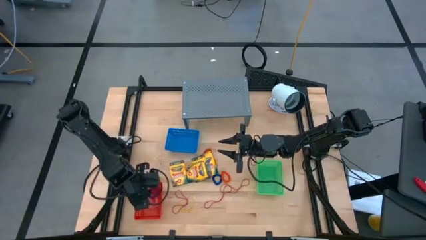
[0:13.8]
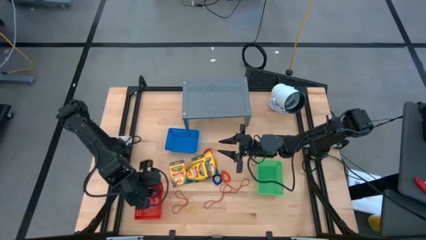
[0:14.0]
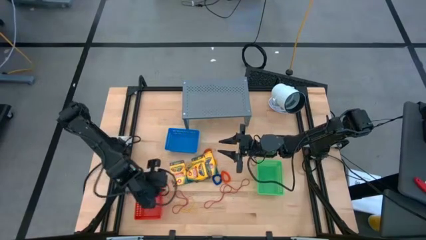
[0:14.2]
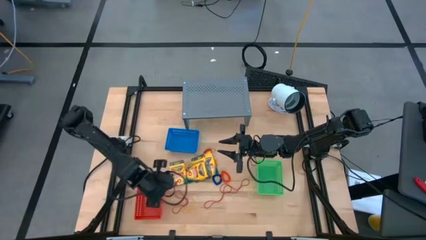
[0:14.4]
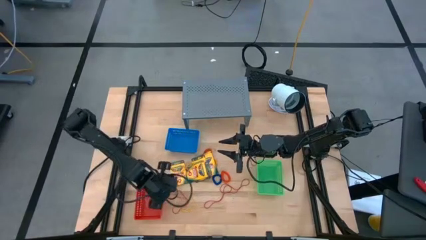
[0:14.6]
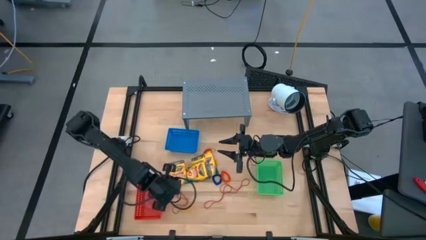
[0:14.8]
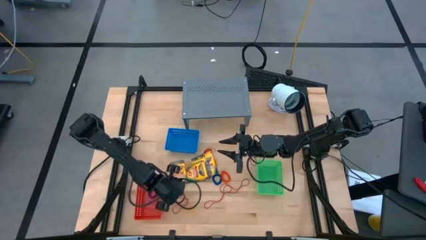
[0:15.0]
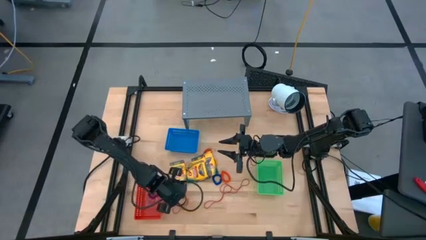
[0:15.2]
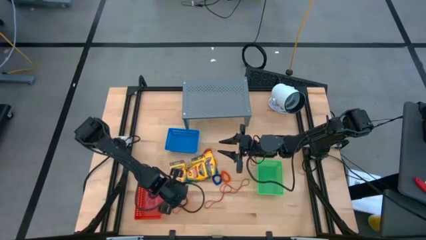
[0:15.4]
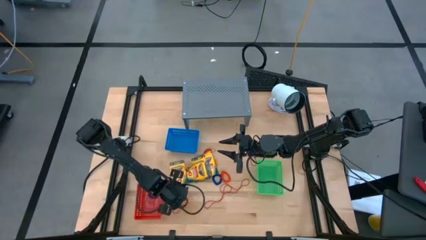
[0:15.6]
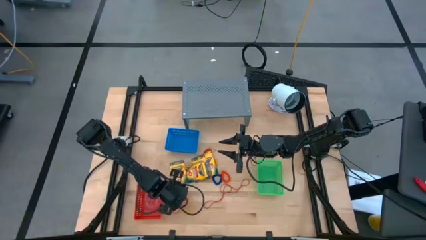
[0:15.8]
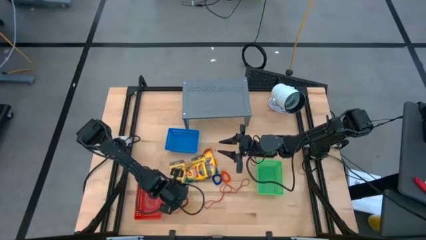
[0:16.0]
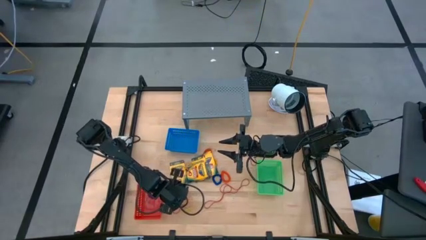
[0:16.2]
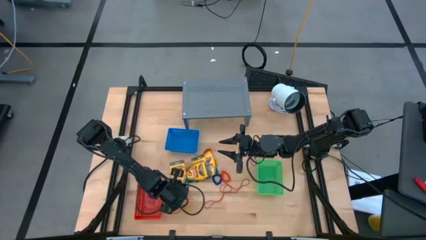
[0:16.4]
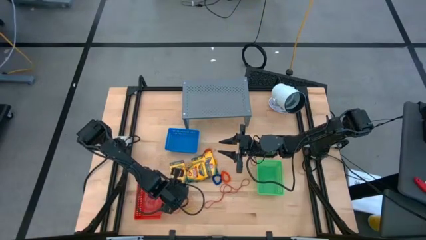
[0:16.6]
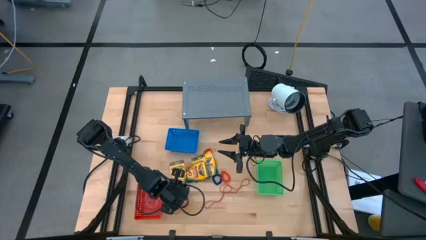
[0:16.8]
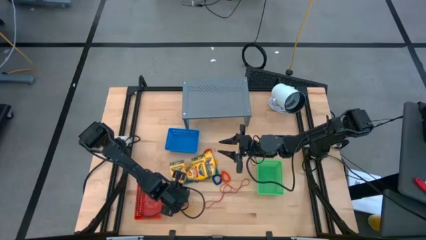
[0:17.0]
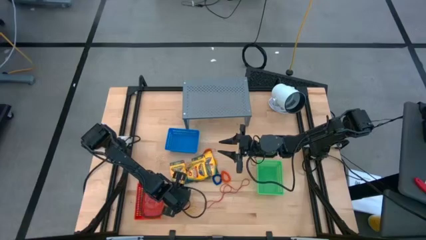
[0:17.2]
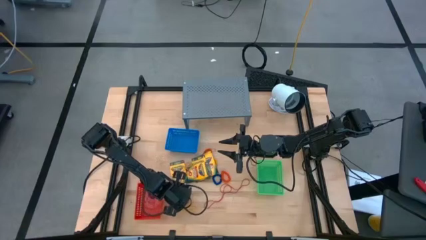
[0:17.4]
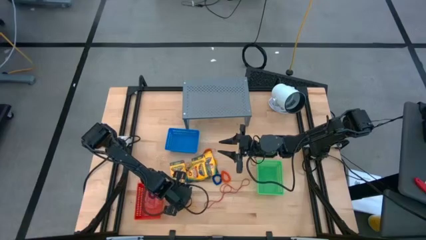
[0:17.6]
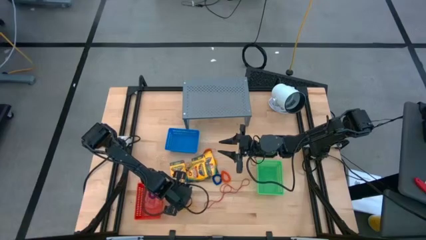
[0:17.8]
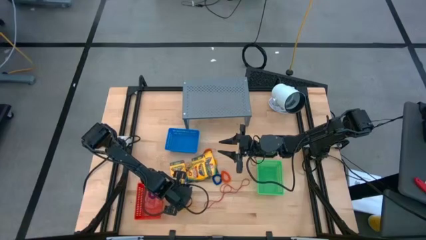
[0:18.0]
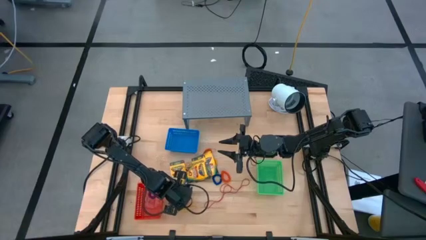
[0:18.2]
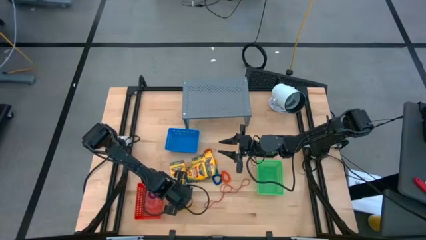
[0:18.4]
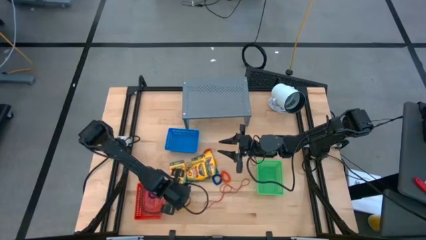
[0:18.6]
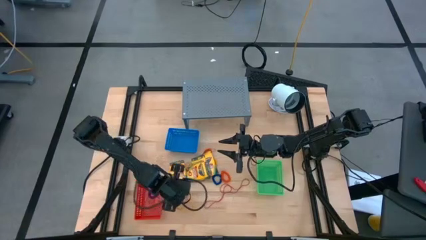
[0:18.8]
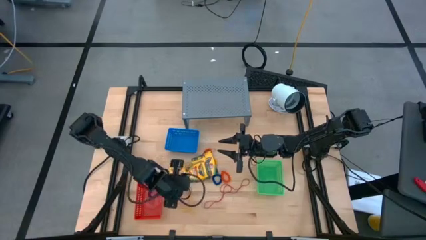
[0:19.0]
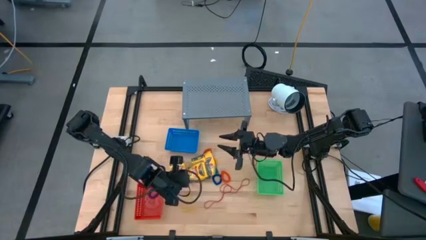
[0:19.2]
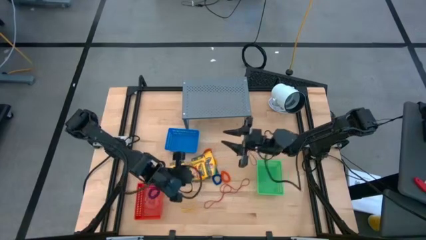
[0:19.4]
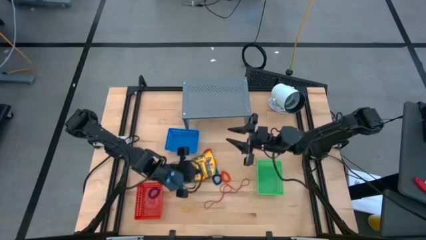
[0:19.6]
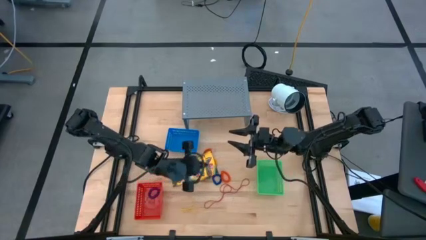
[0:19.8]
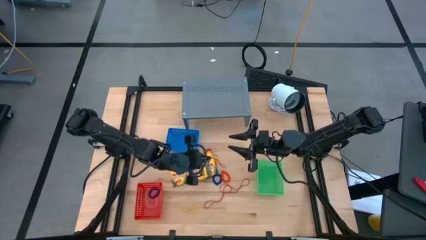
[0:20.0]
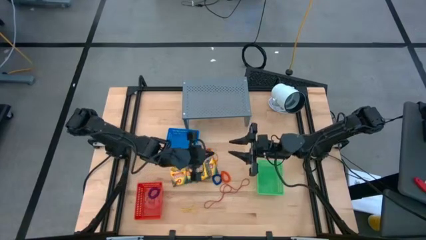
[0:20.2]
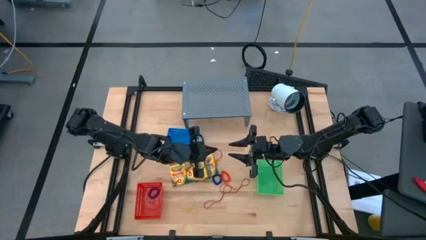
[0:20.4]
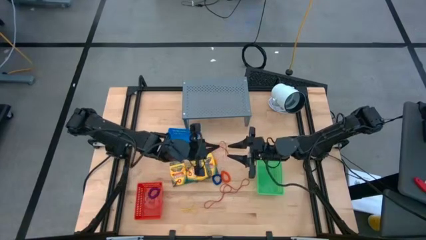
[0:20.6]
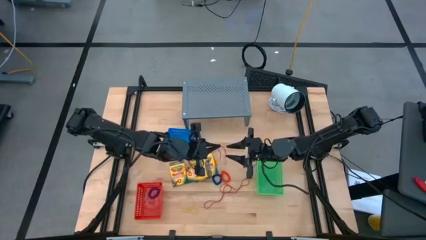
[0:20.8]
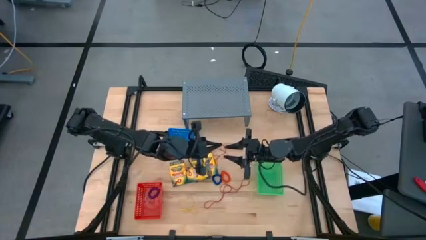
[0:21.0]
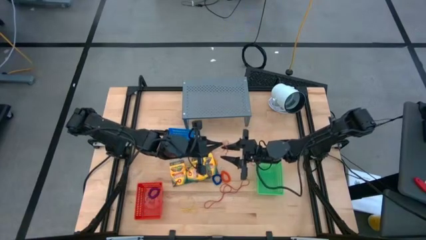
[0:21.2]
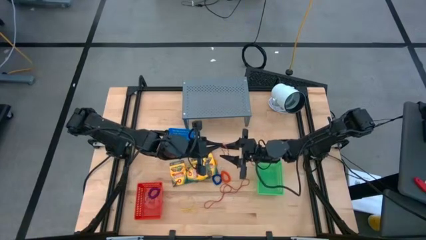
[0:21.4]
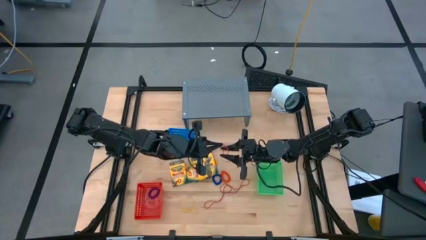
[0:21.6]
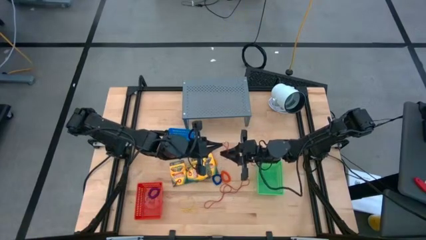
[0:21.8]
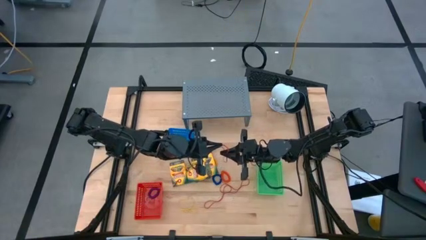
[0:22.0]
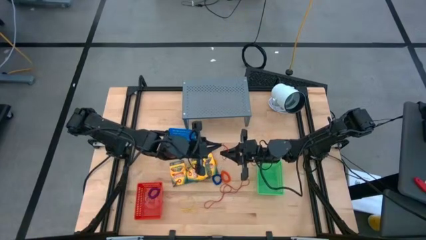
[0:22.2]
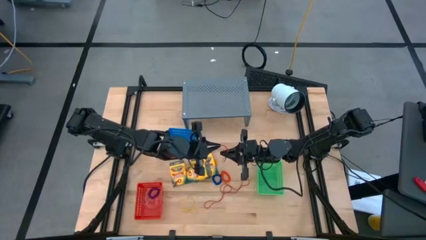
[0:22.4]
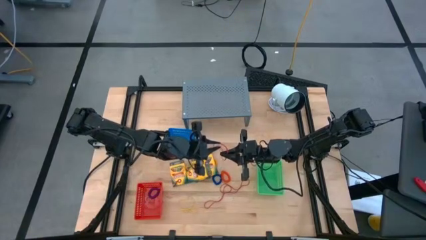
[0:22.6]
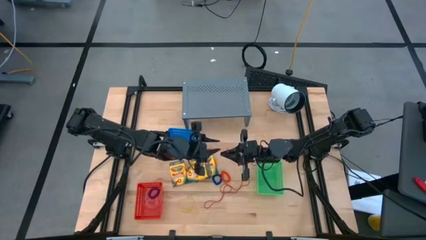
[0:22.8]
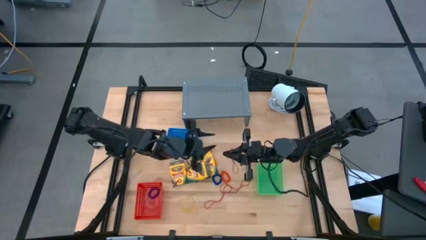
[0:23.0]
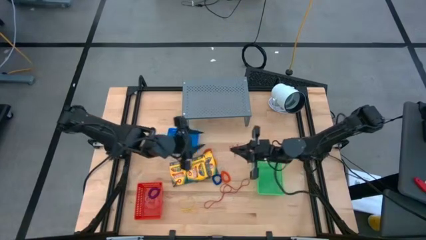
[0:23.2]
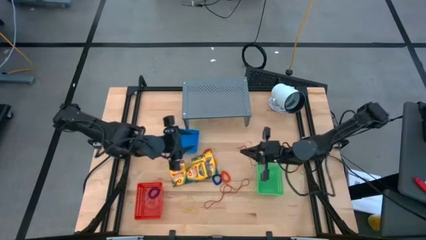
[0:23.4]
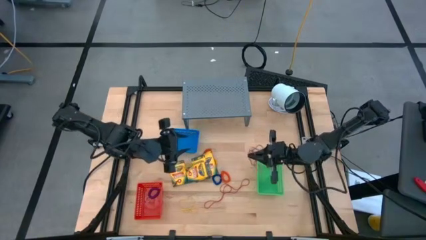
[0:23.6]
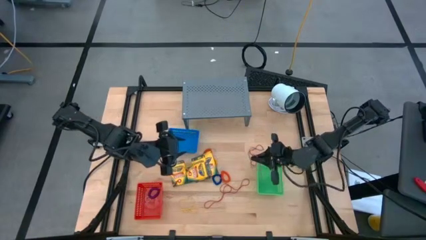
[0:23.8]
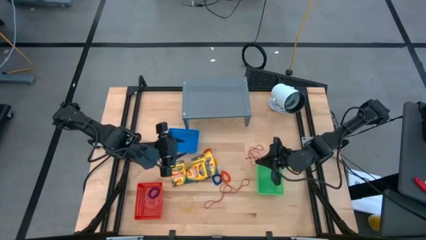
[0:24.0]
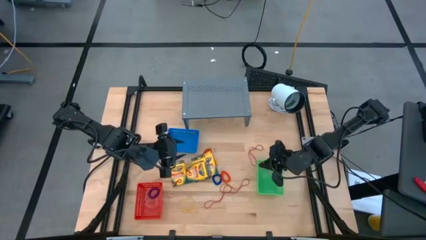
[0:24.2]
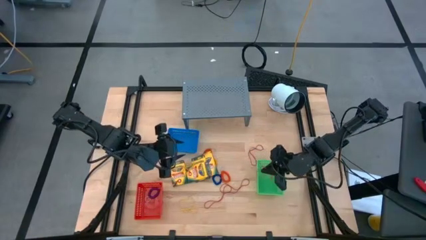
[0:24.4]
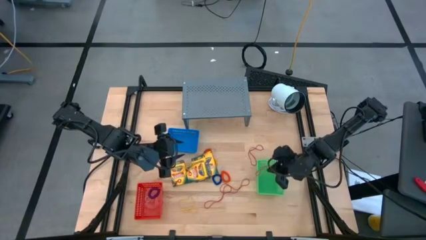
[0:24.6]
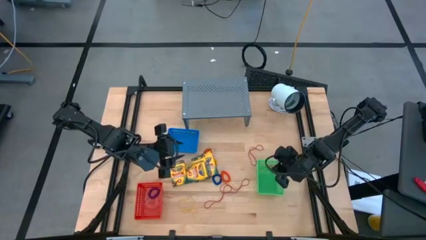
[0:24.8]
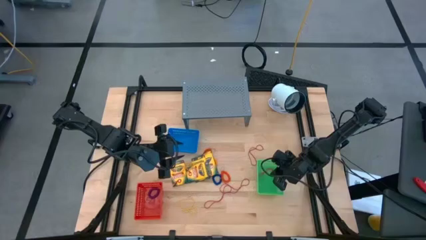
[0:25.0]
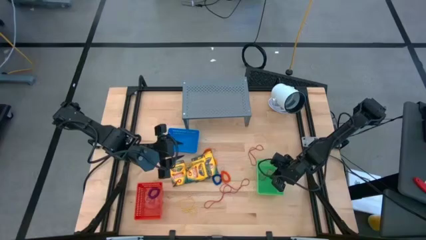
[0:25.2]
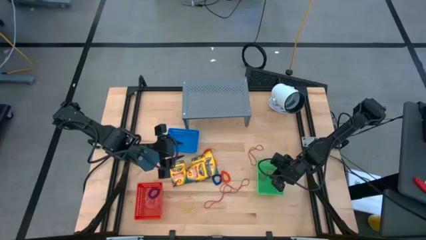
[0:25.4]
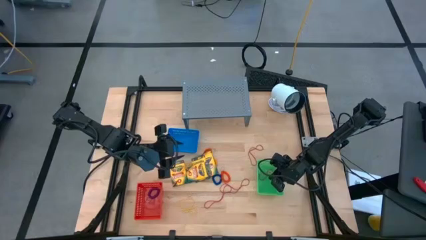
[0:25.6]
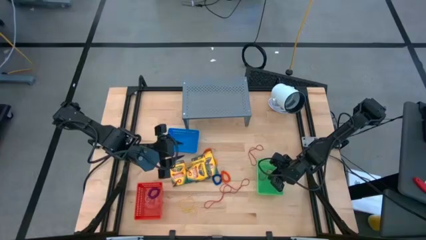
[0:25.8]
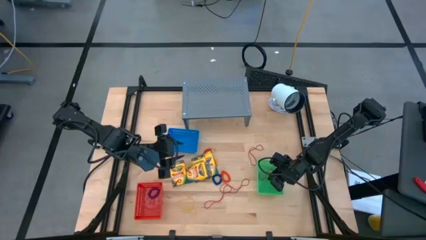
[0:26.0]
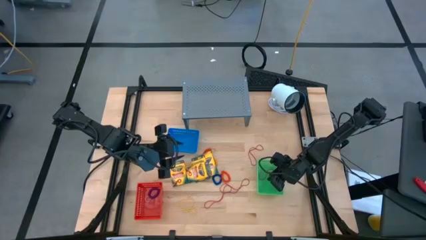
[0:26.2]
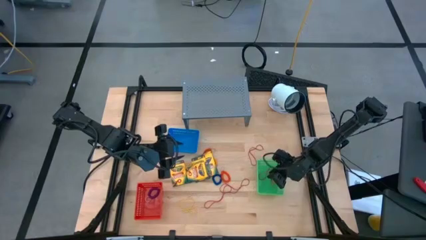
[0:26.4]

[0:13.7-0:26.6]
Task: Pick & Place Office Desk Supplies
Put the red rubber band into the green bin
